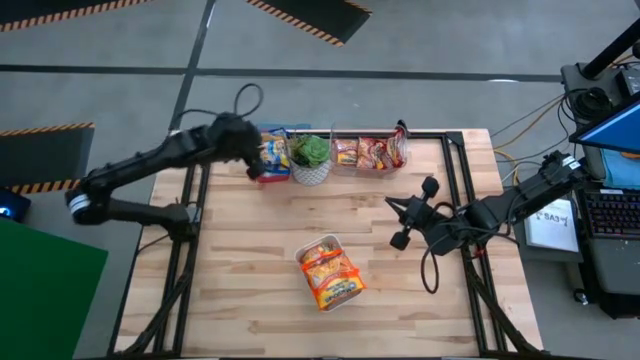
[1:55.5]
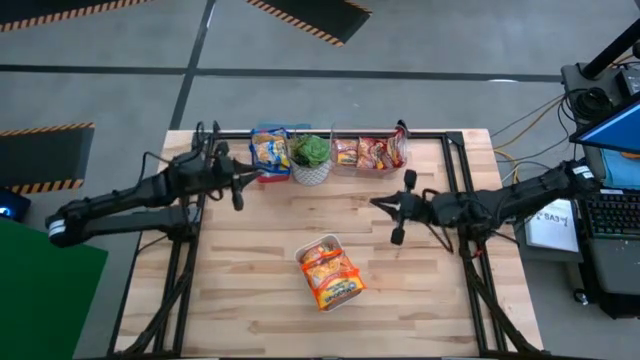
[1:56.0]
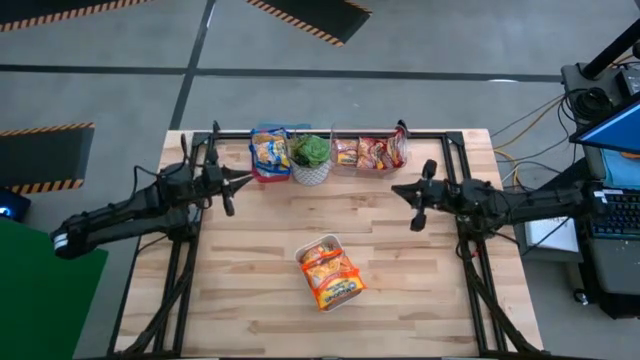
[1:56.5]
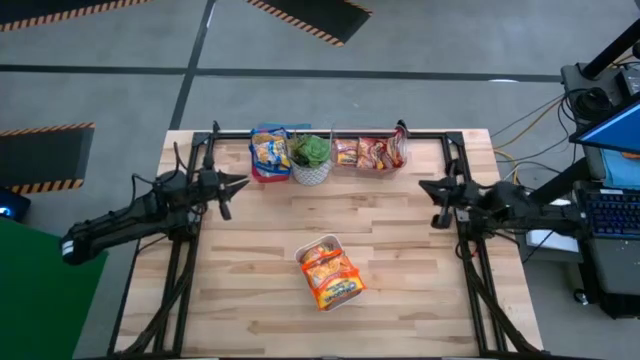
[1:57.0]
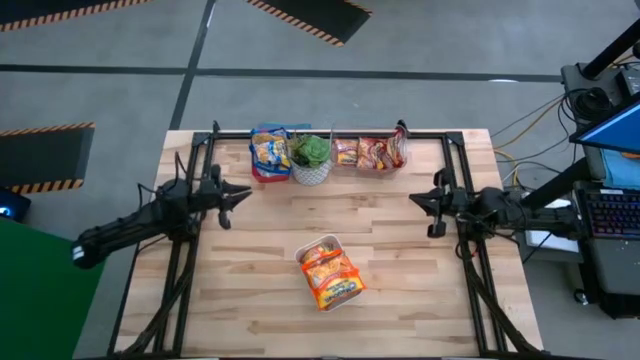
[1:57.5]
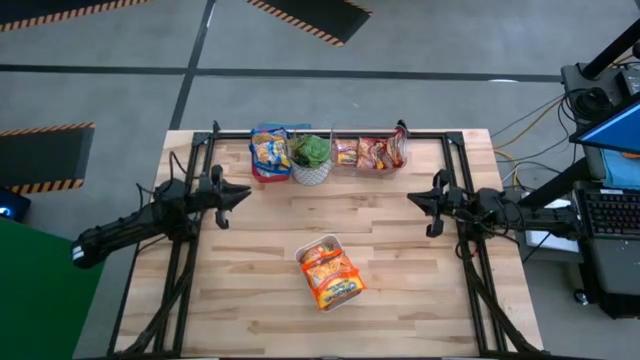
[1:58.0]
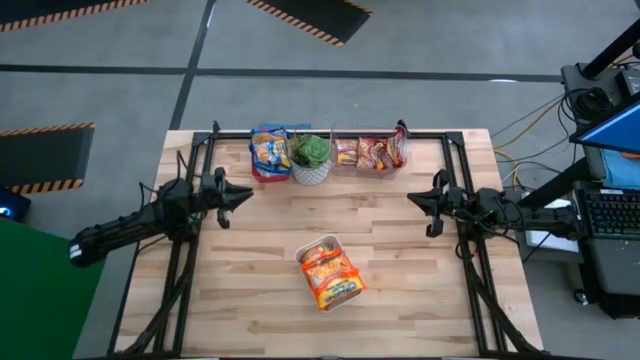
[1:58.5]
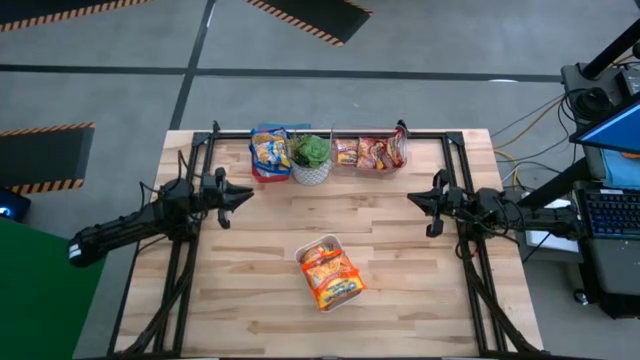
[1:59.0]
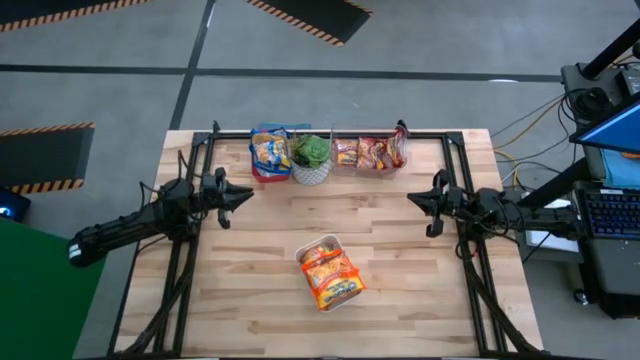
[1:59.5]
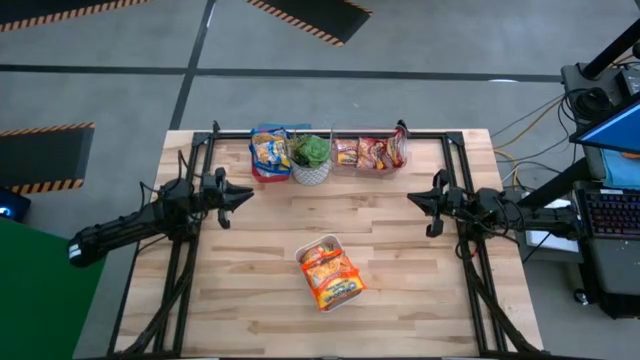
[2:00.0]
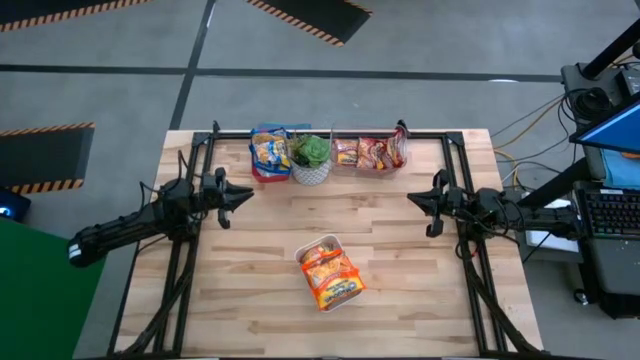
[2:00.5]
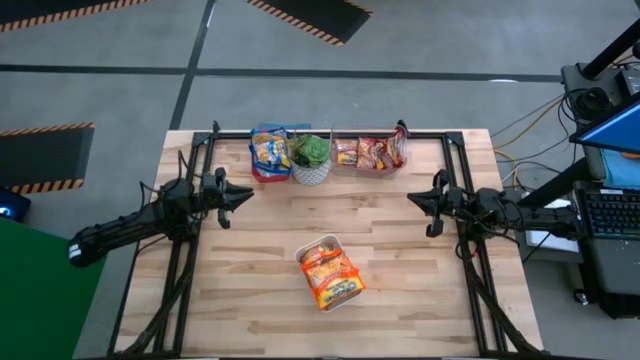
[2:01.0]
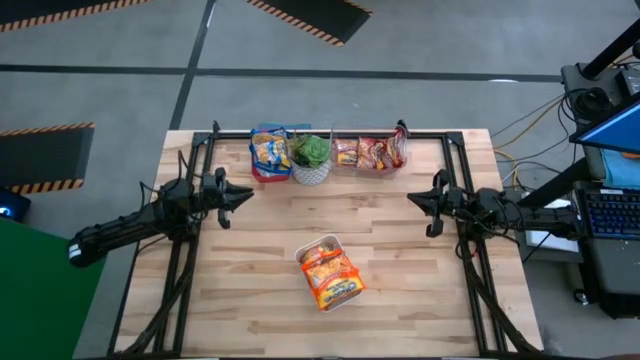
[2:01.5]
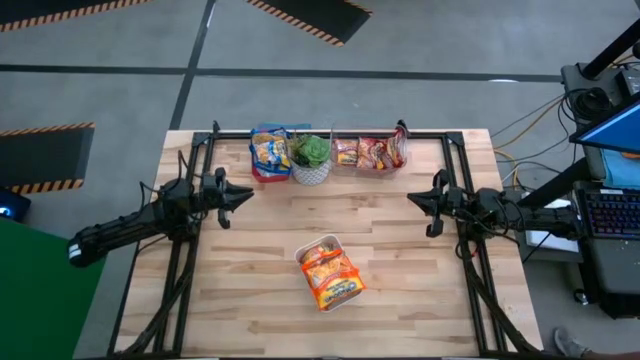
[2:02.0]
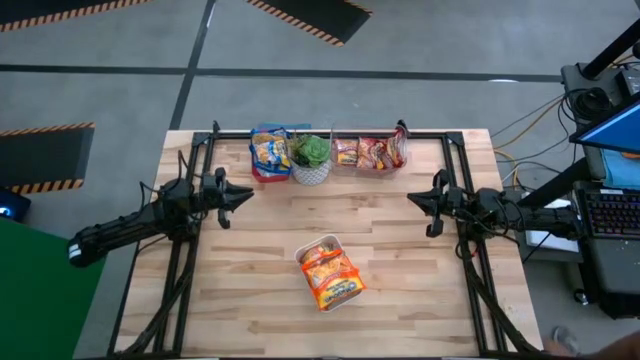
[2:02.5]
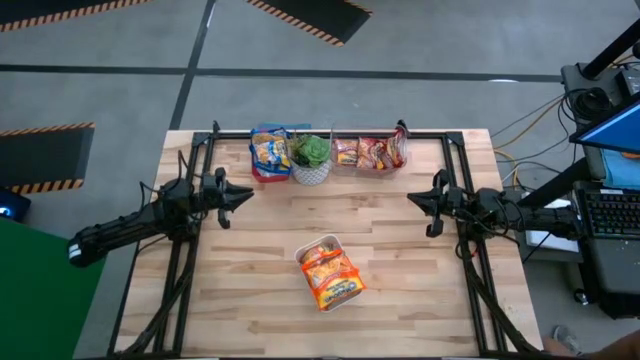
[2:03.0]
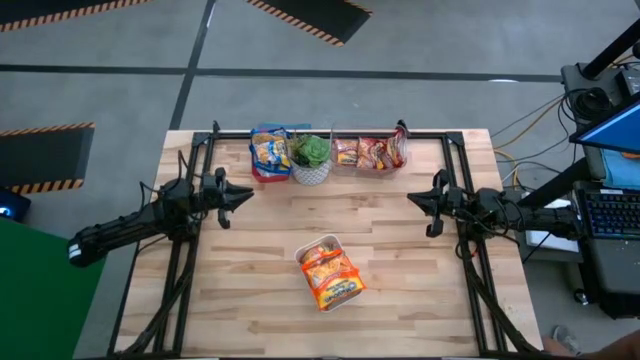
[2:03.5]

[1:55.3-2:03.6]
Task: Sort Maruchan noodles
Return to Home Position

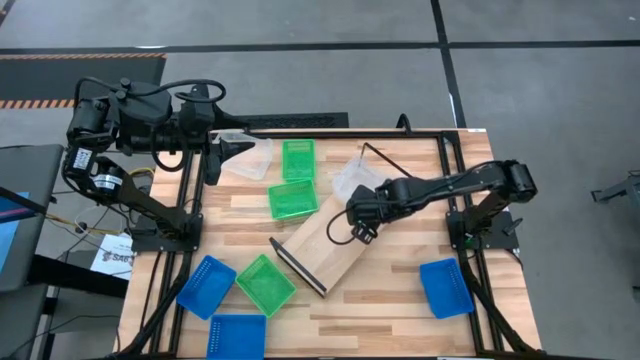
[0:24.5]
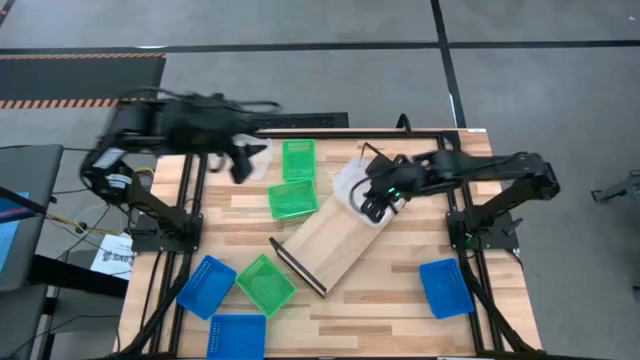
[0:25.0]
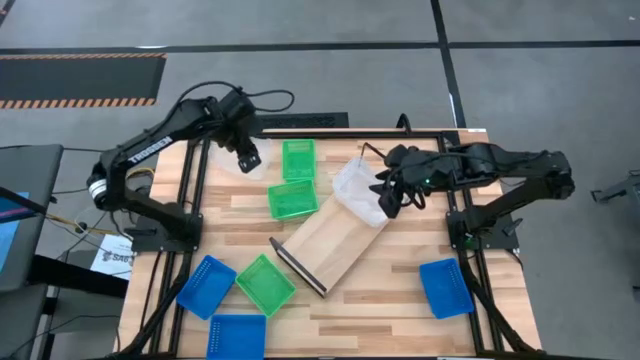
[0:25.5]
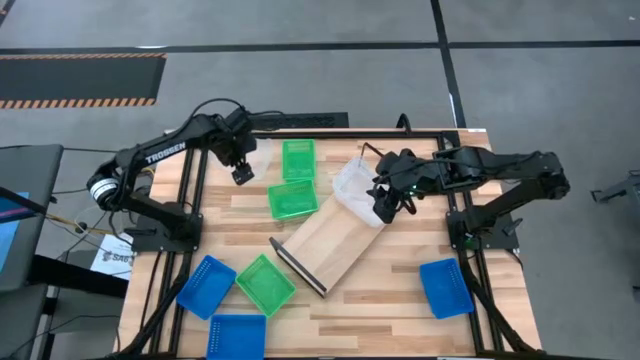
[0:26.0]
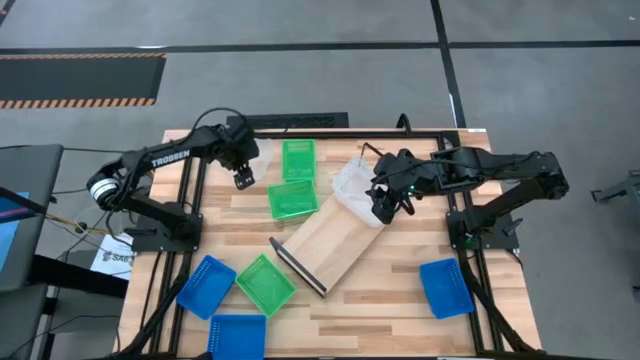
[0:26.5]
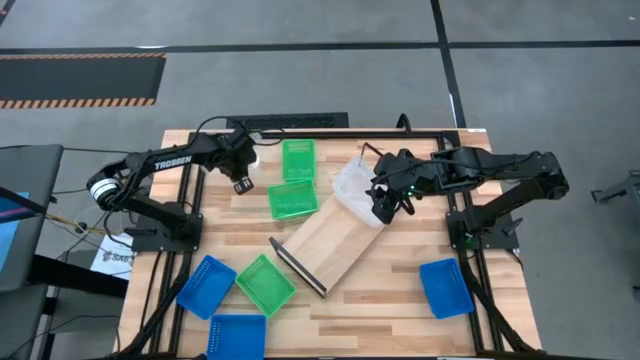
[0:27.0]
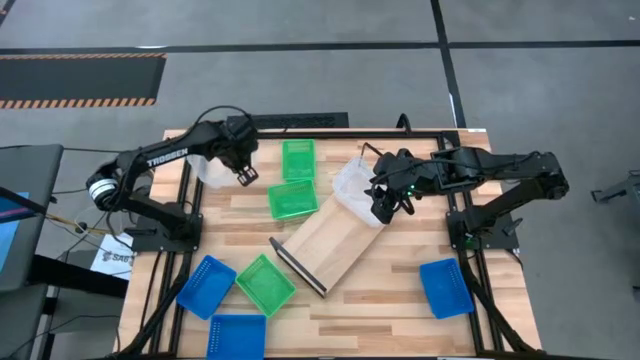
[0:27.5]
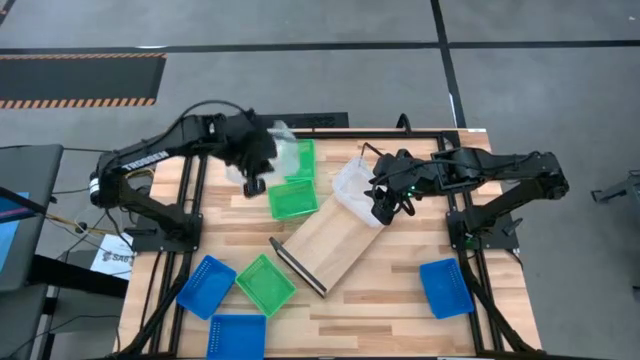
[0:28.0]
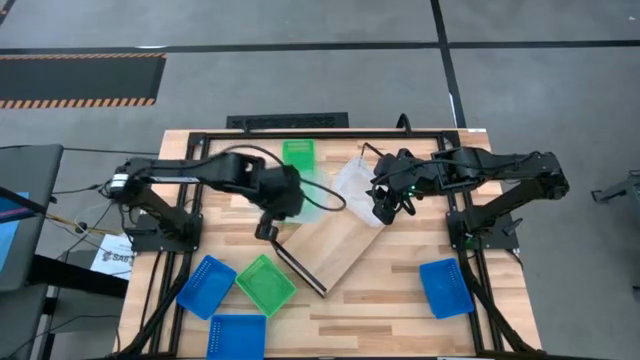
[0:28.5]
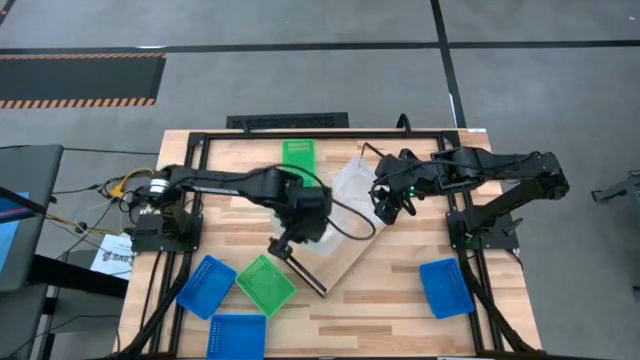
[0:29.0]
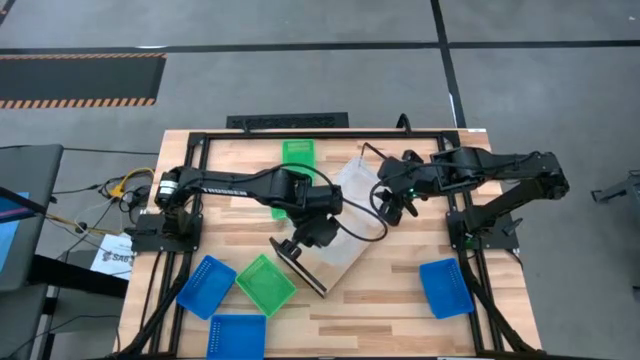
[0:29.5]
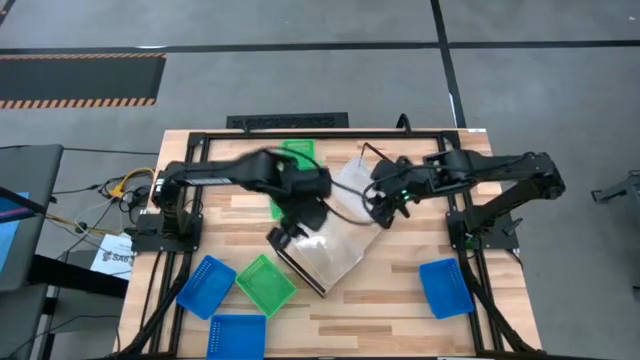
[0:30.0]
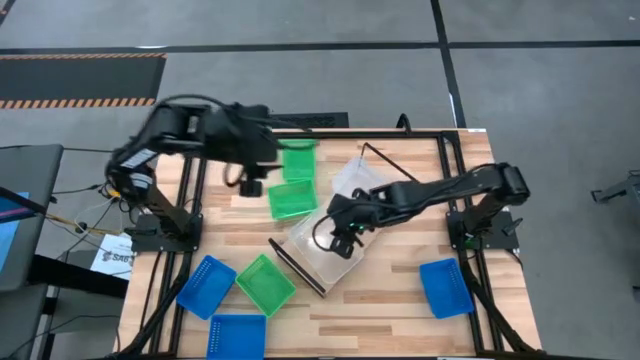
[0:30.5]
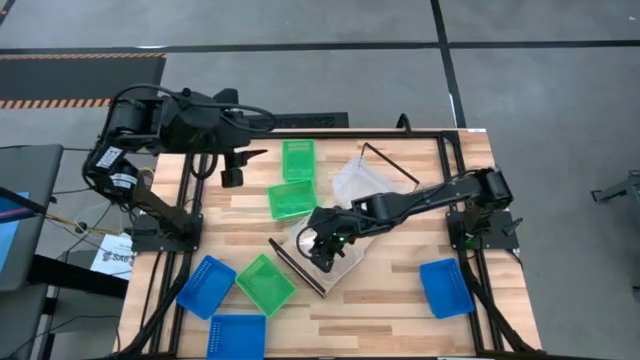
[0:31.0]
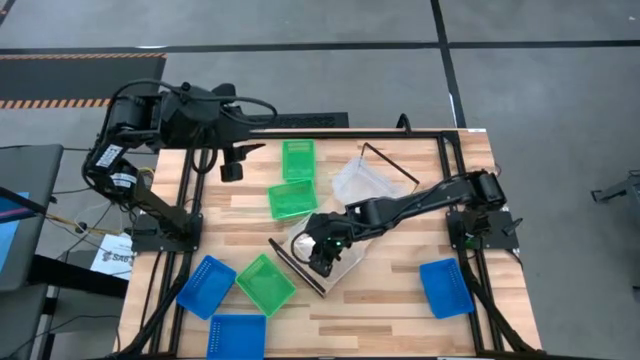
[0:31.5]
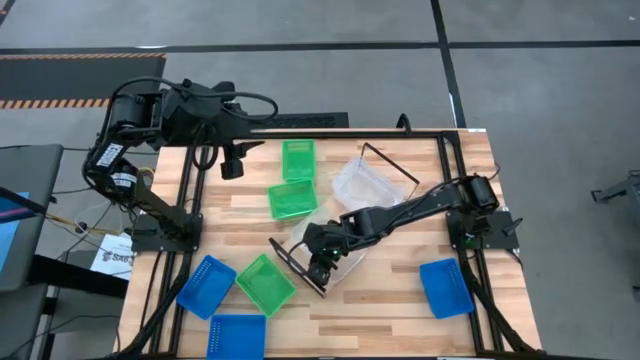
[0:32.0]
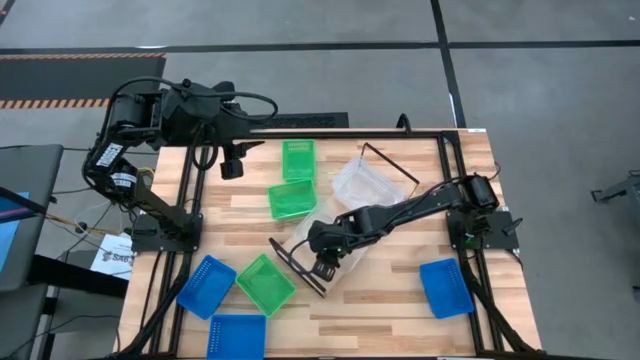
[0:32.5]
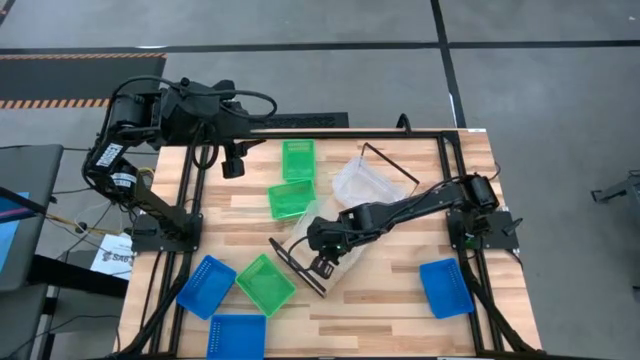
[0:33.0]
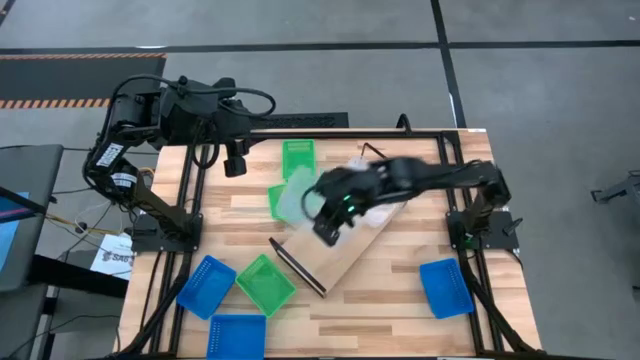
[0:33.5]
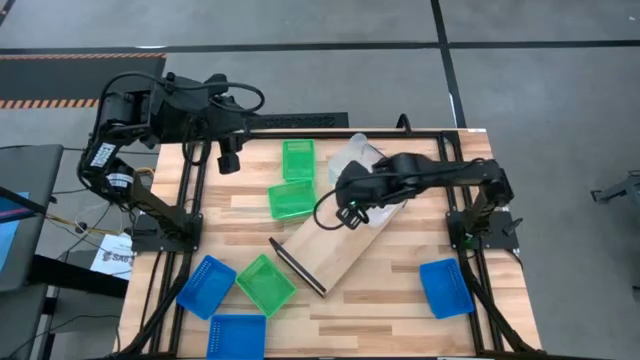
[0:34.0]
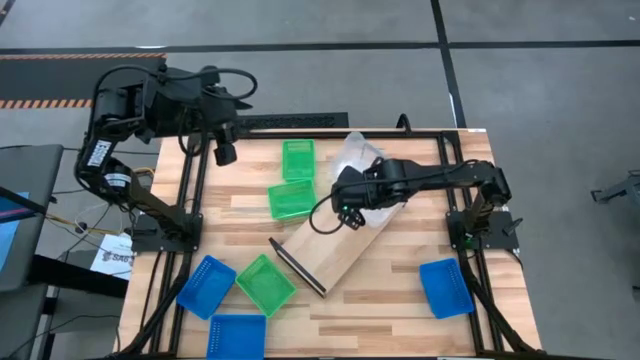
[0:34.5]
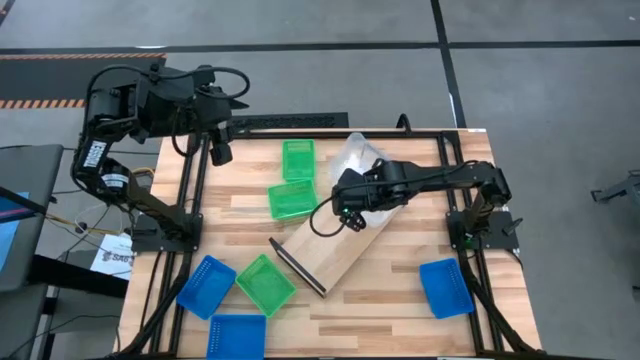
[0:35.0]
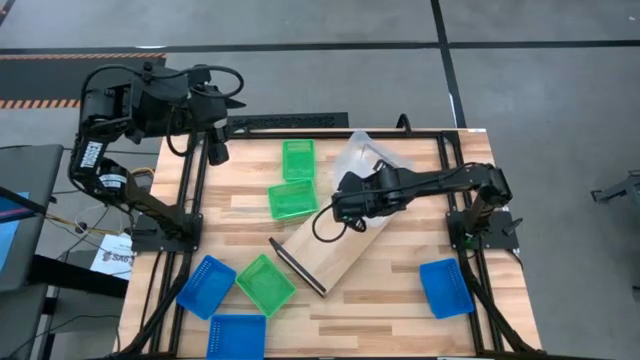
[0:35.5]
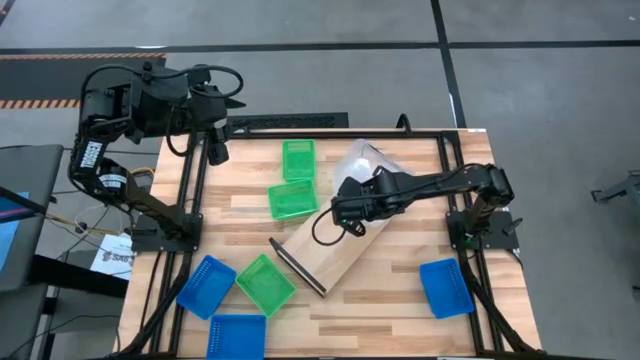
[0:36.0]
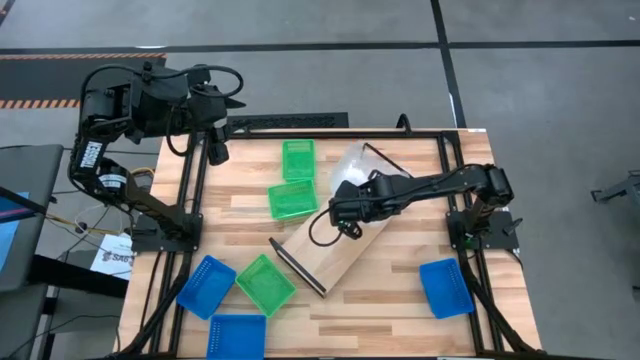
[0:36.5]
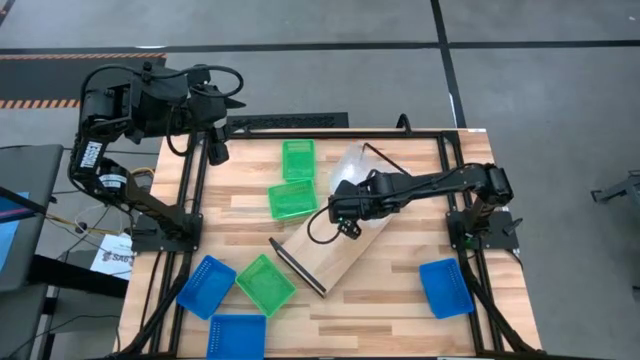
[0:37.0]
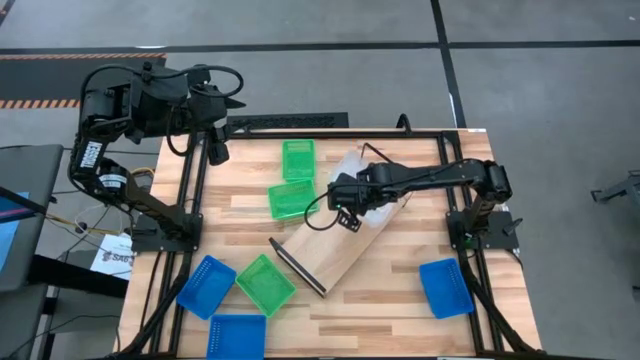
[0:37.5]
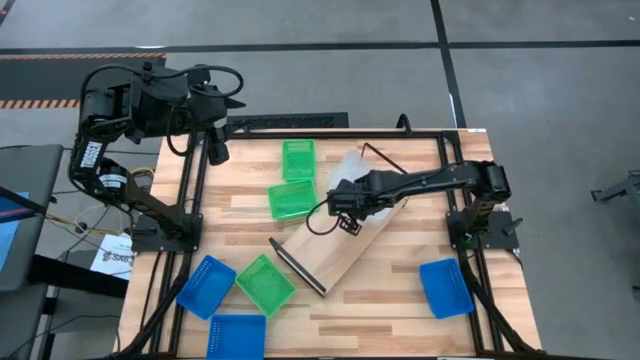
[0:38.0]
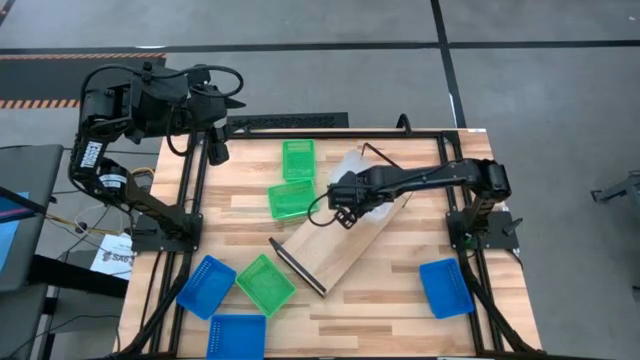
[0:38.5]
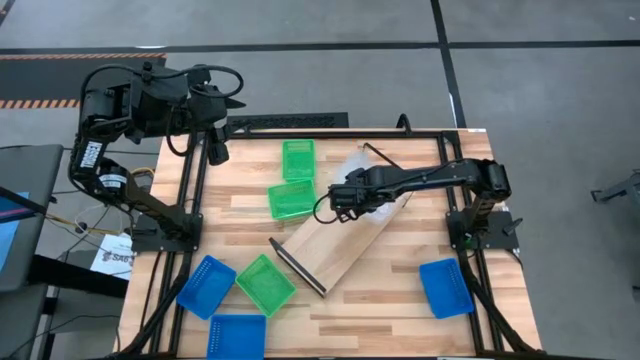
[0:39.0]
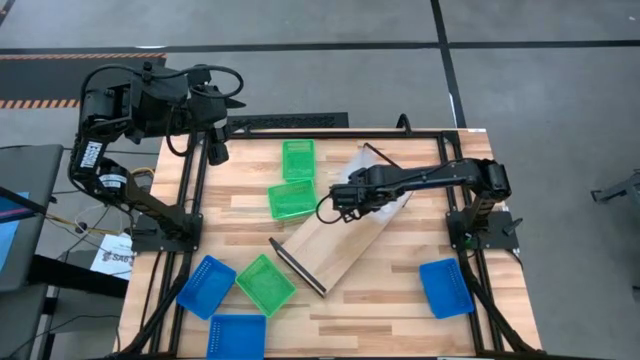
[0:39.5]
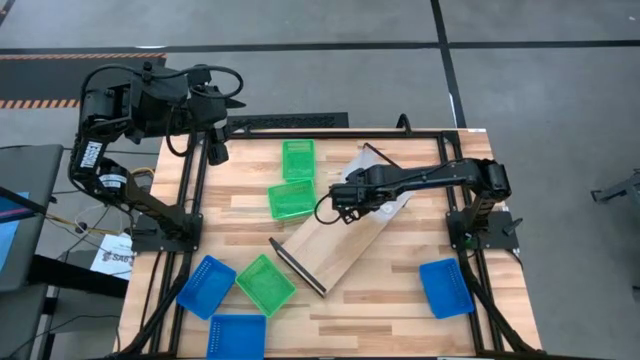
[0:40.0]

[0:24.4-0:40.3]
Task: Stack baskets on shelf by color
Stack the transparent bin on the other transparent bins on the shelf
